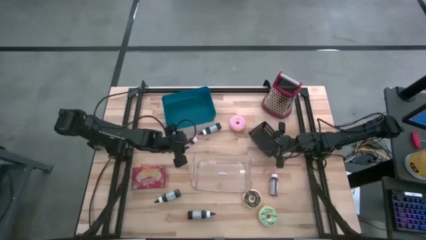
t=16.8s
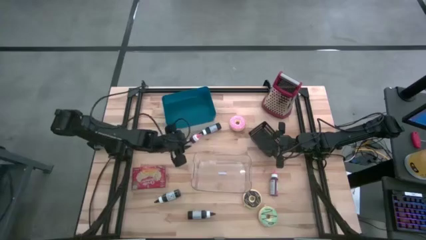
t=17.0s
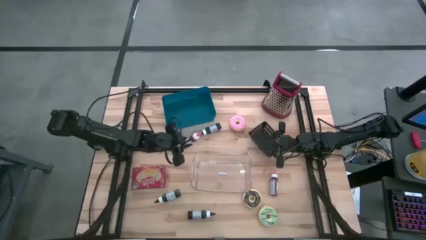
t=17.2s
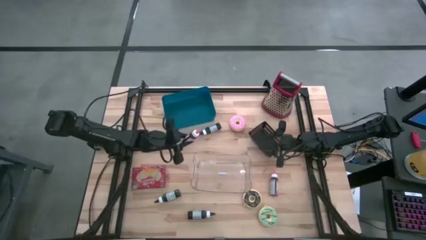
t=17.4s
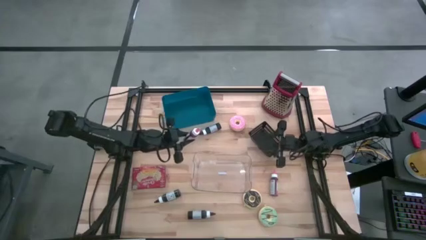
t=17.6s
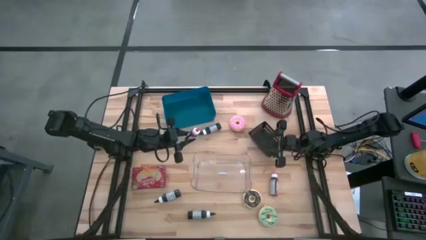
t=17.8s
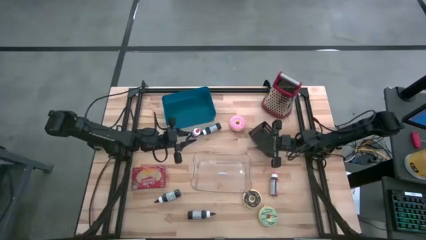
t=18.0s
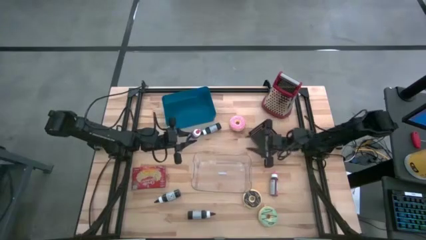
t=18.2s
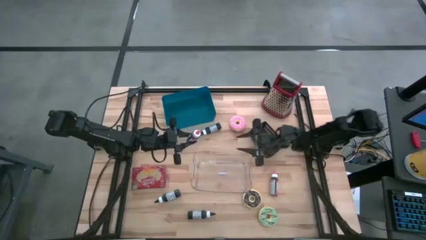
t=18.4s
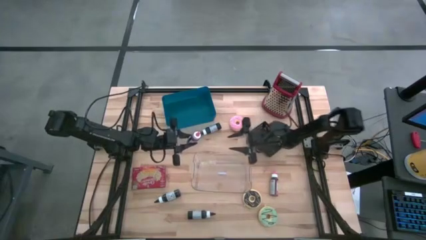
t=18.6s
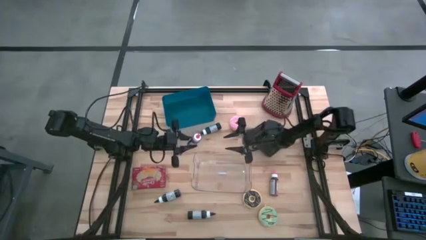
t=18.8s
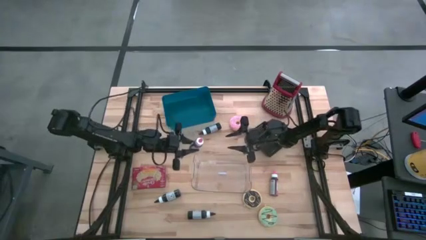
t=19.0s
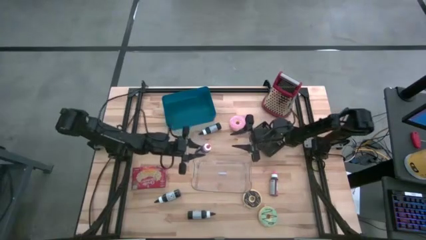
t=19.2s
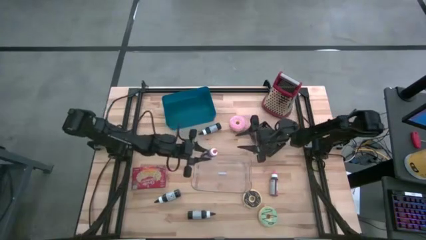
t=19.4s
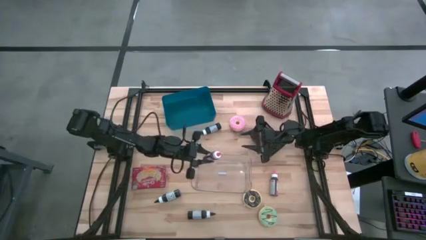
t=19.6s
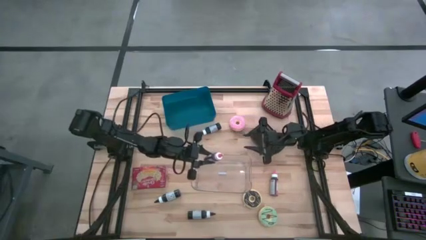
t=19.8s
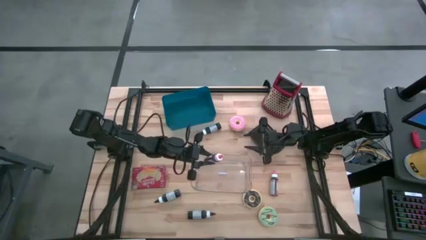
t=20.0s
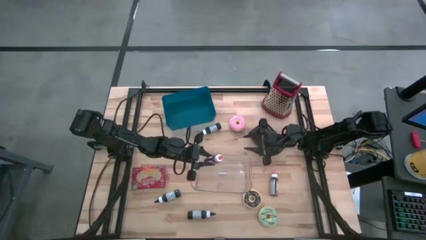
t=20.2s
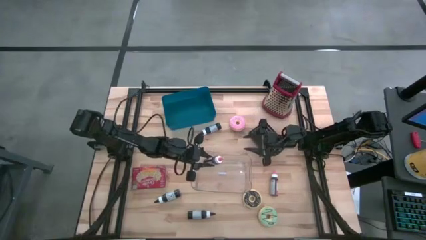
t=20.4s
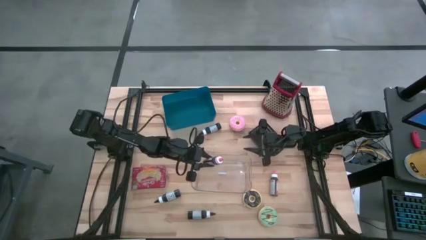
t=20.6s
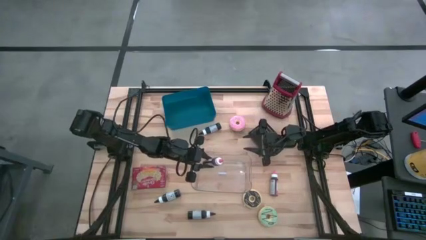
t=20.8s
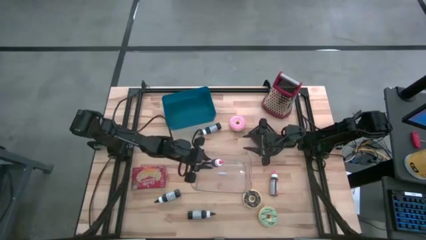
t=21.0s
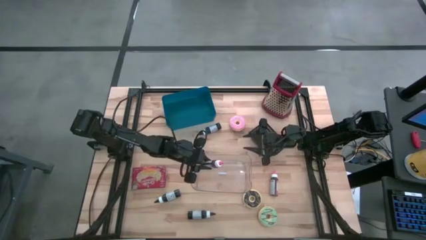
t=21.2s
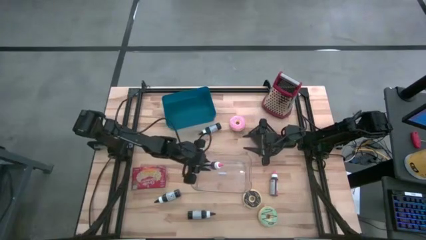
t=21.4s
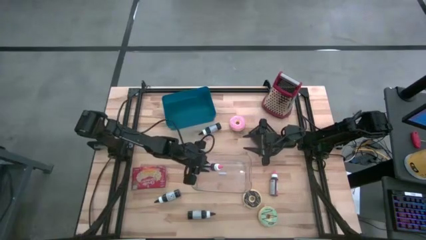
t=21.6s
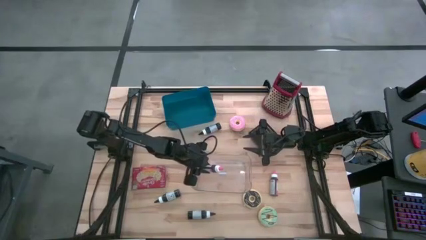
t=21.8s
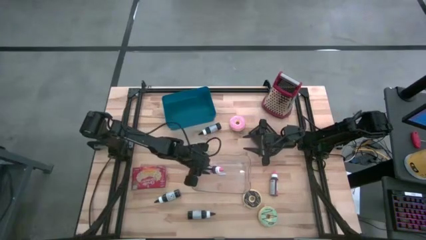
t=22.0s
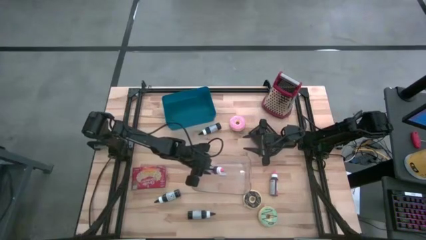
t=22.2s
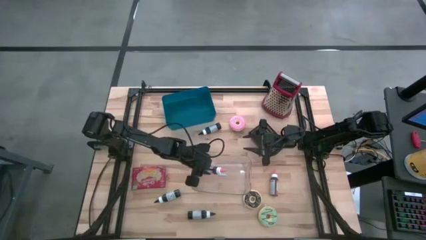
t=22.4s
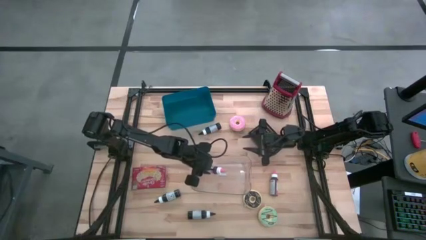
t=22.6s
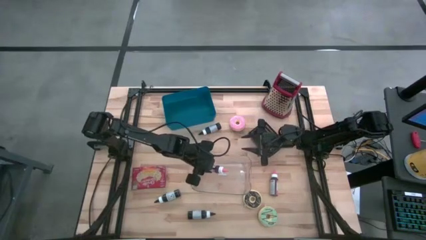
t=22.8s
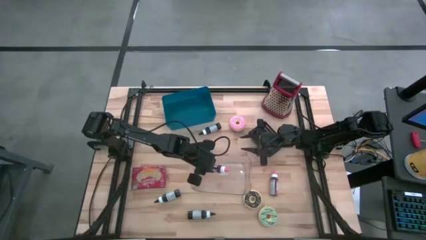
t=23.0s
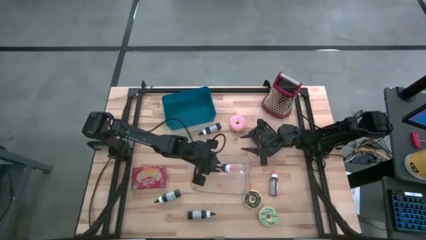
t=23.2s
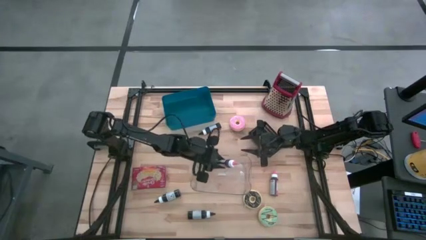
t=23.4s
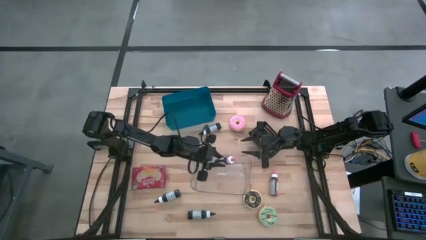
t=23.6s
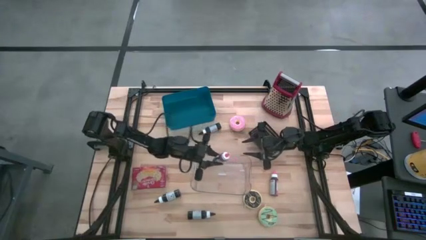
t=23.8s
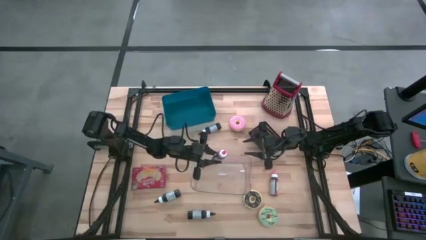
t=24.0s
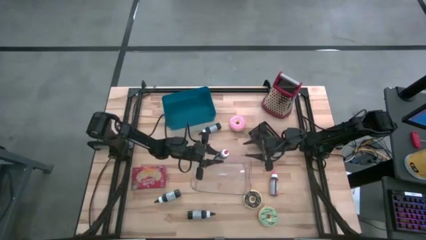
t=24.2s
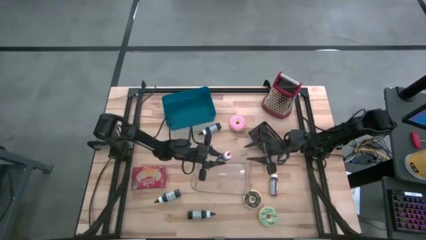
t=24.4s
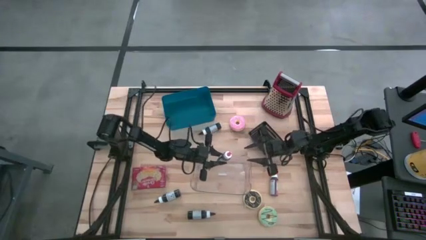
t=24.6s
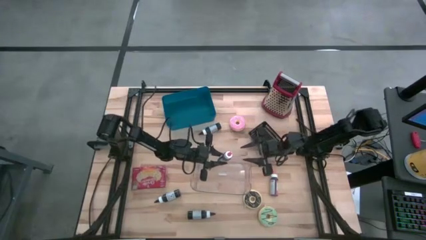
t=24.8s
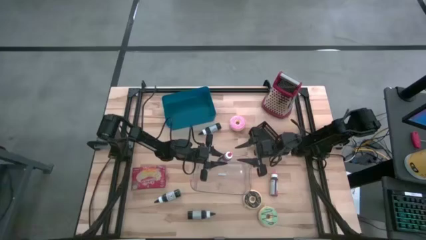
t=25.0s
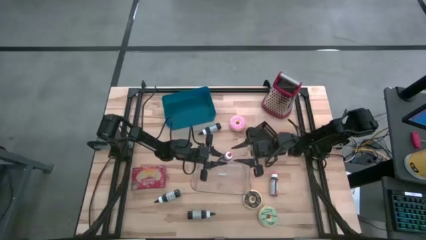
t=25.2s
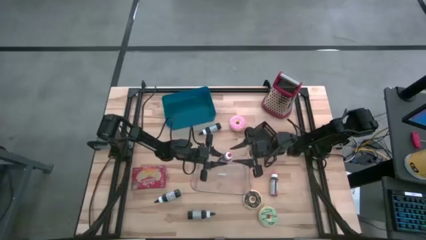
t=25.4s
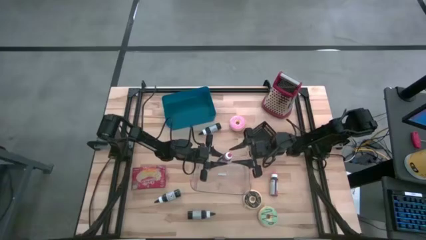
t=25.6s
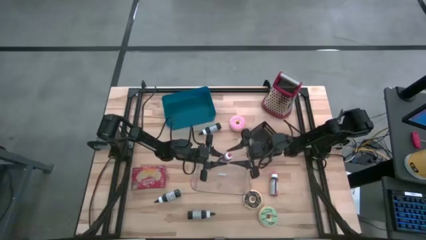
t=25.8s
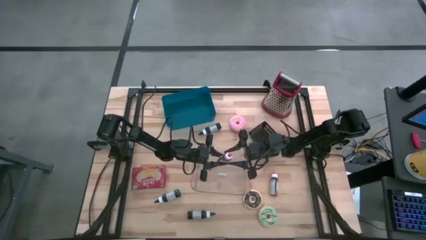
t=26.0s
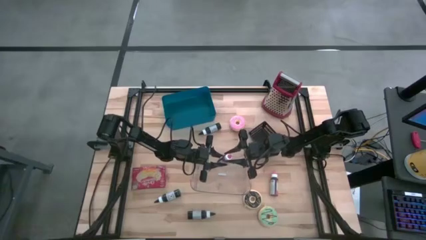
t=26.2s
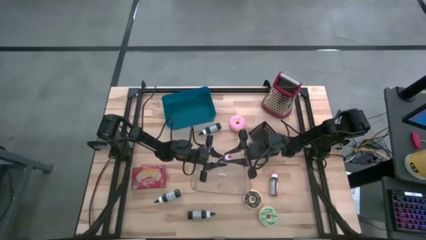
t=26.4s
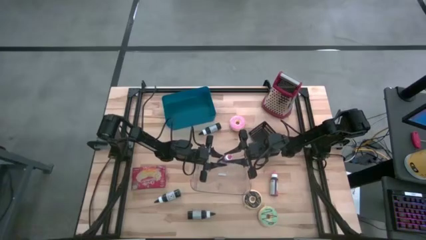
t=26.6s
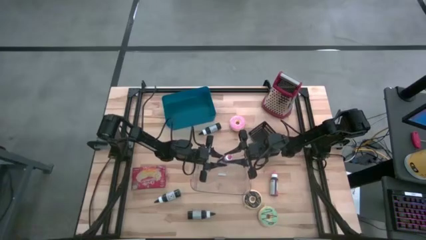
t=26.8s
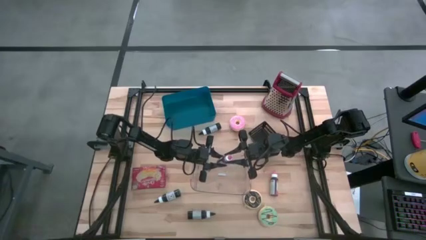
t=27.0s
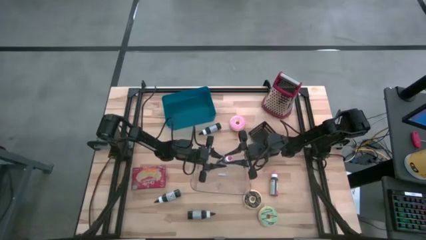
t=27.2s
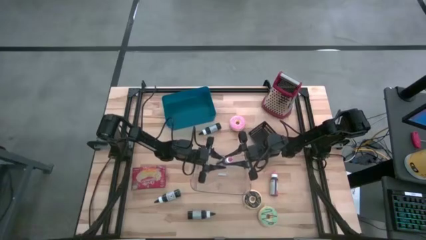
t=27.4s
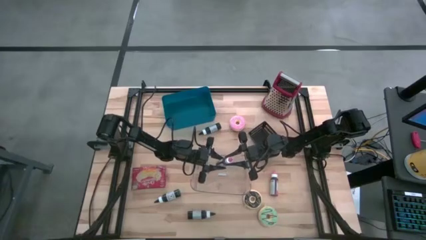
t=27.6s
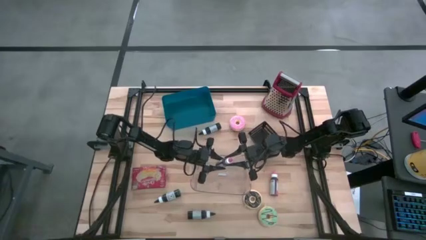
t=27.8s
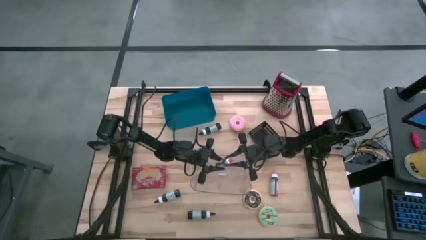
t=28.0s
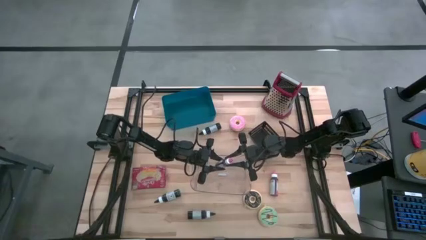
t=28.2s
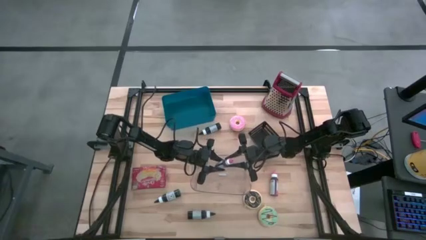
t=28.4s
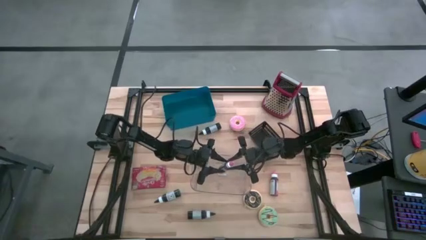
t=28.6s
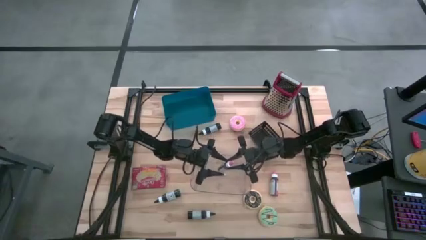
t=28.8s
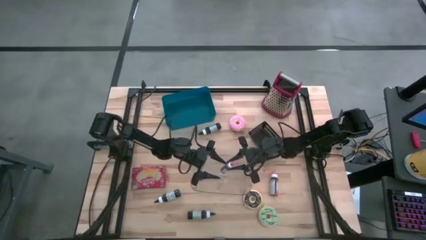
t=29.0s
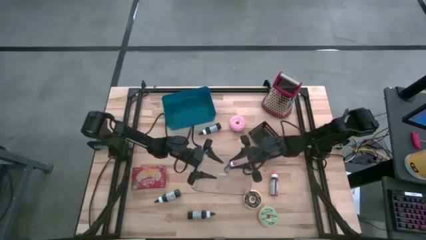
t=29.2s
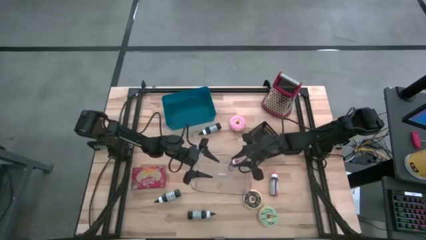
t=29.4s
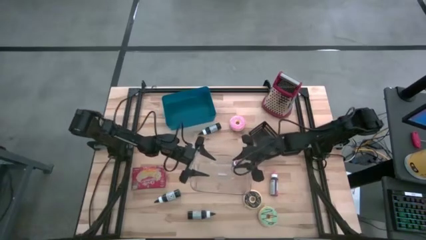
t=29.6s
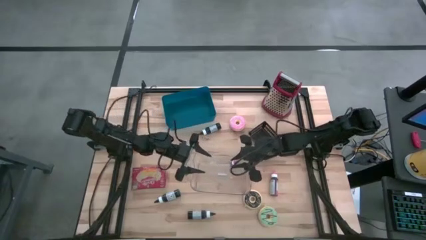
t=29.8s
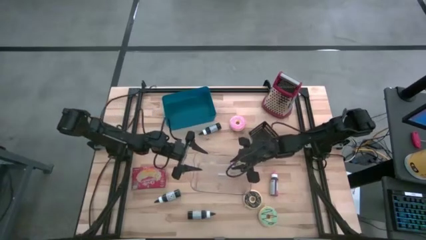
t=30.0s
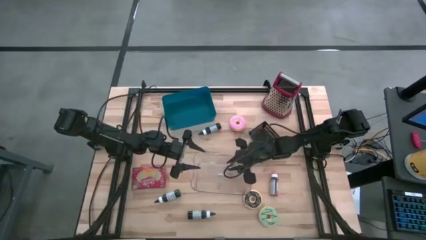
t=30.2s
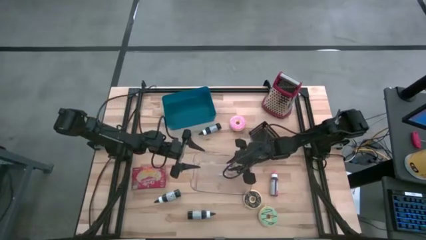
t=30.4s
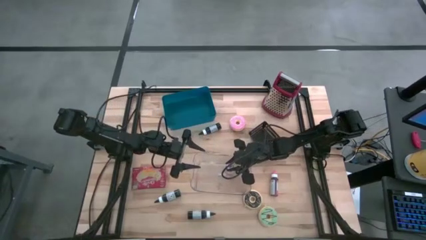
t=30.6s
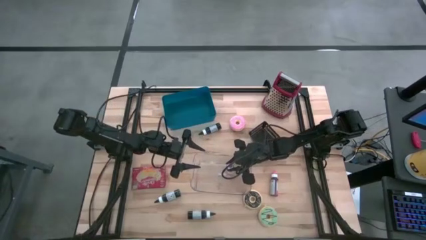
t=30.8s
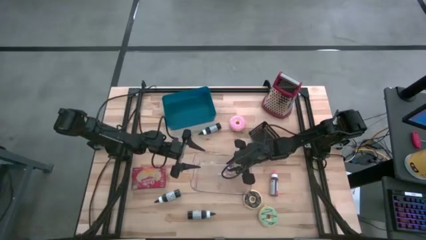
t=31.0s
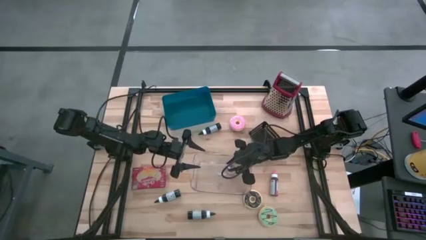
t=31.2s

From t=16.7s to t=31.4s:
Put the left pink food coloring bottle into the transparent bin
